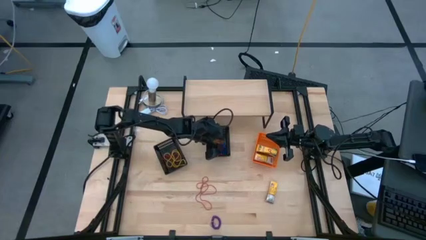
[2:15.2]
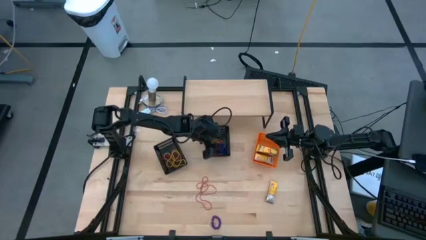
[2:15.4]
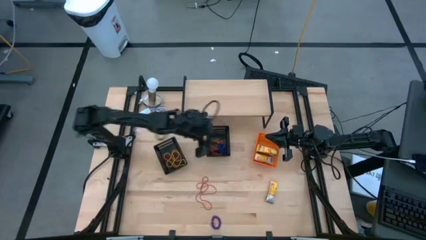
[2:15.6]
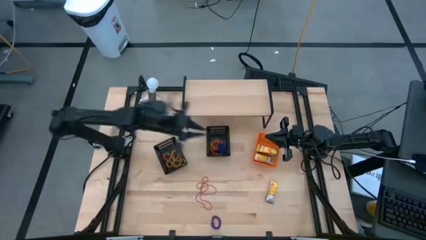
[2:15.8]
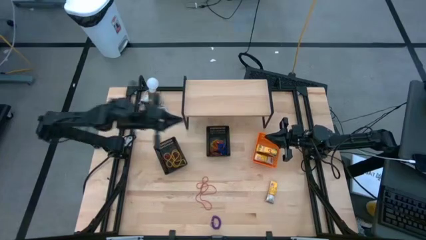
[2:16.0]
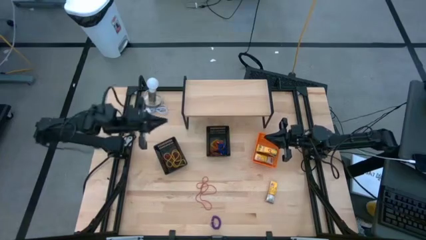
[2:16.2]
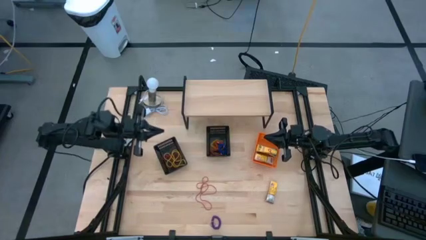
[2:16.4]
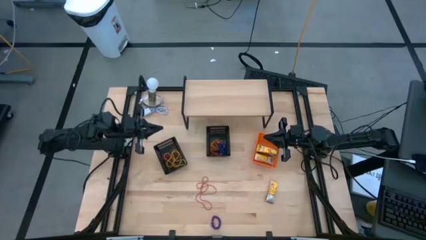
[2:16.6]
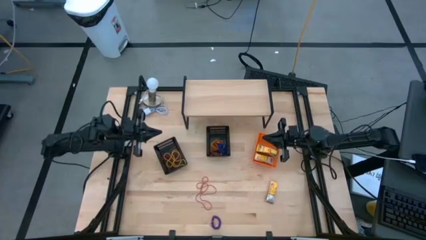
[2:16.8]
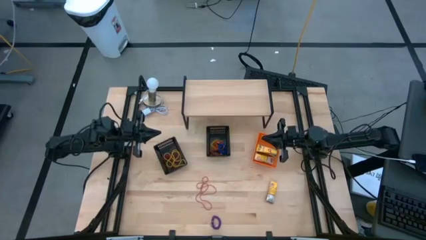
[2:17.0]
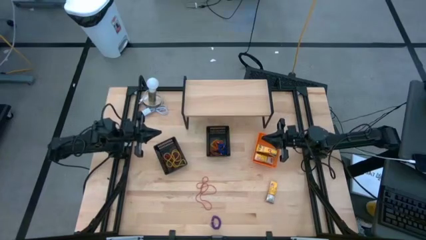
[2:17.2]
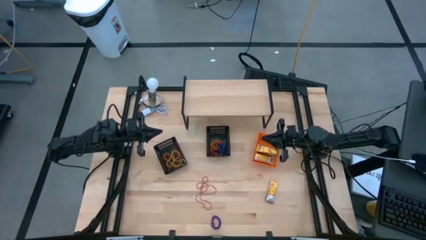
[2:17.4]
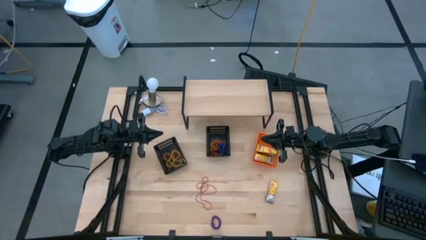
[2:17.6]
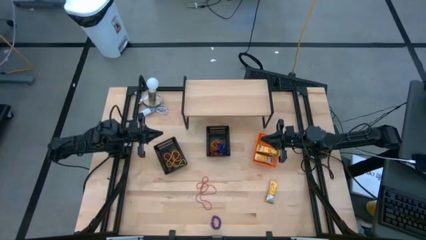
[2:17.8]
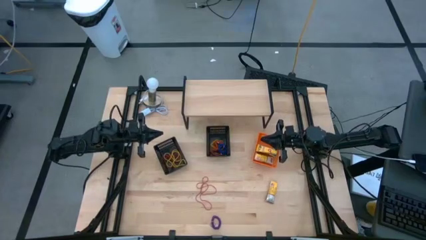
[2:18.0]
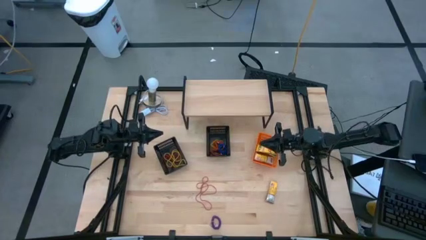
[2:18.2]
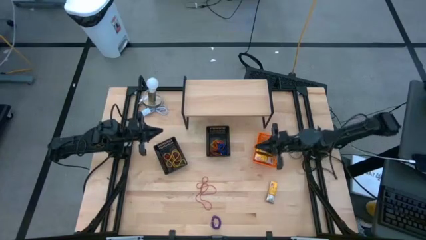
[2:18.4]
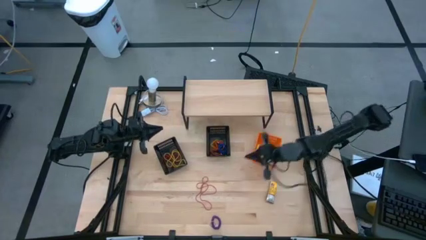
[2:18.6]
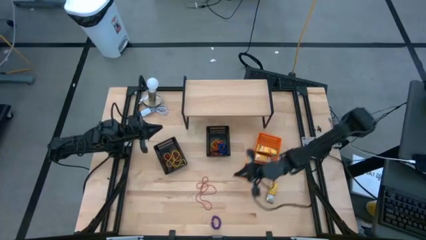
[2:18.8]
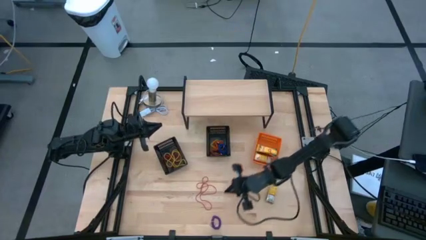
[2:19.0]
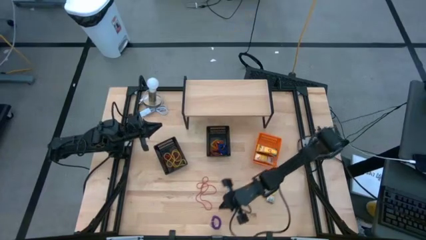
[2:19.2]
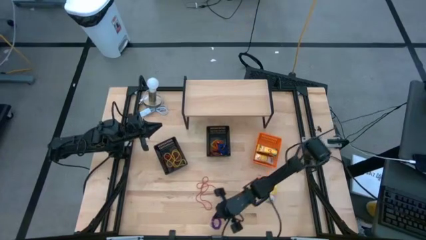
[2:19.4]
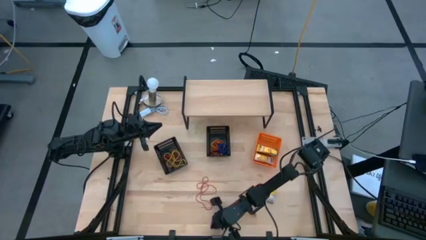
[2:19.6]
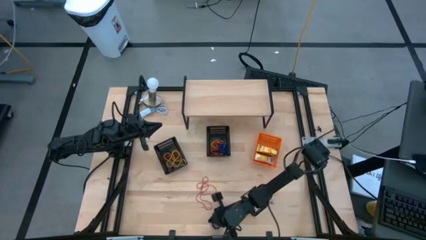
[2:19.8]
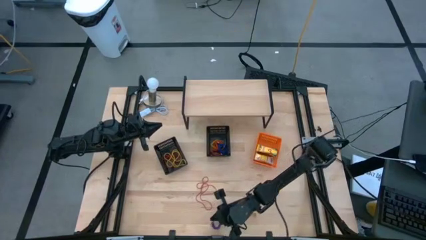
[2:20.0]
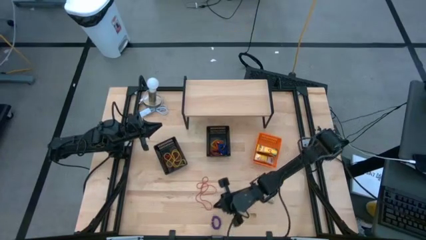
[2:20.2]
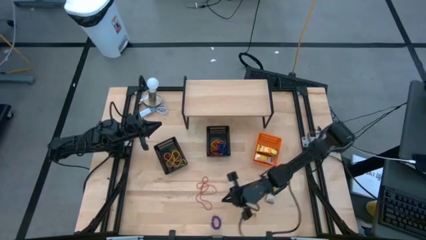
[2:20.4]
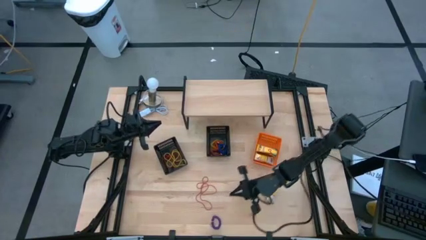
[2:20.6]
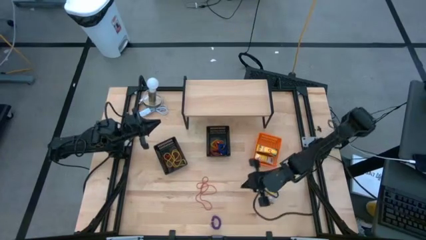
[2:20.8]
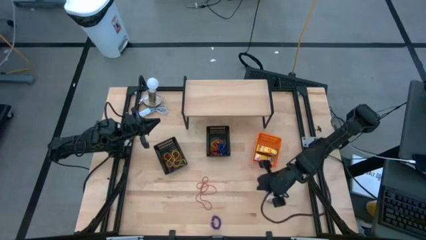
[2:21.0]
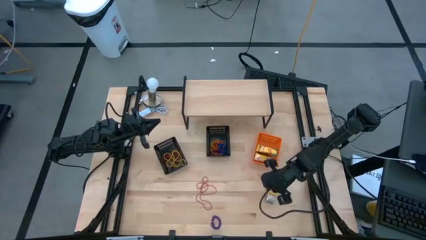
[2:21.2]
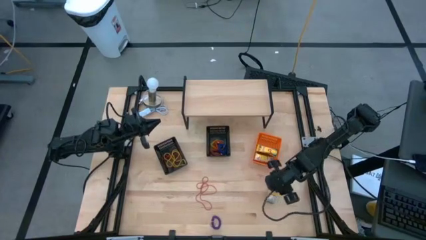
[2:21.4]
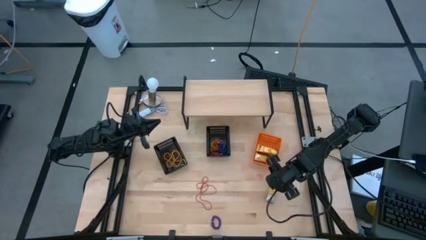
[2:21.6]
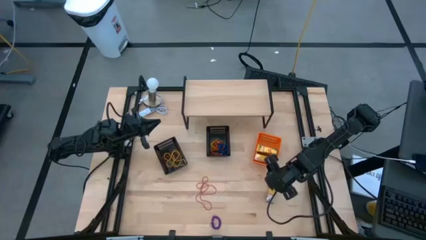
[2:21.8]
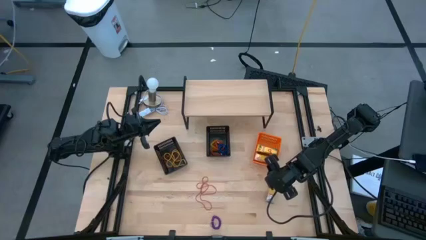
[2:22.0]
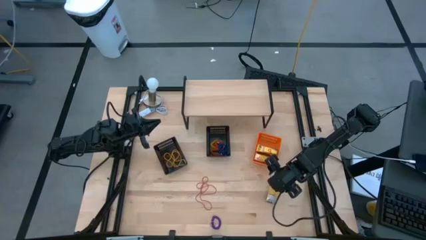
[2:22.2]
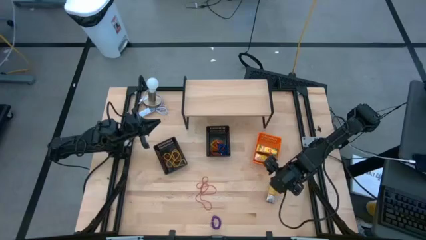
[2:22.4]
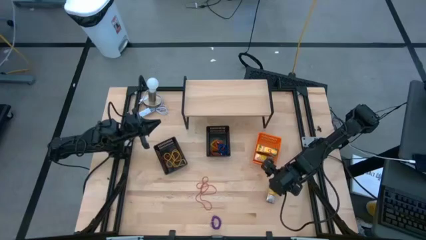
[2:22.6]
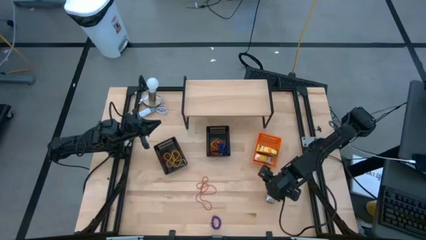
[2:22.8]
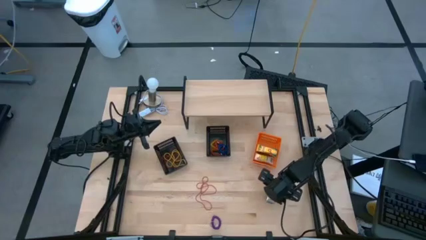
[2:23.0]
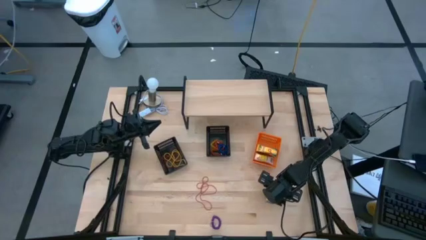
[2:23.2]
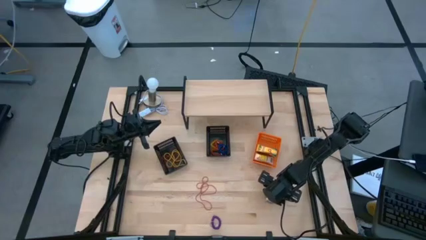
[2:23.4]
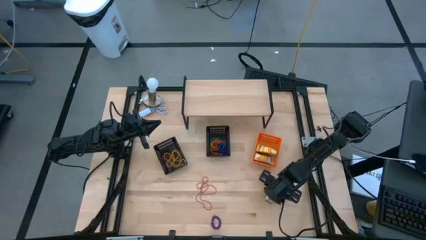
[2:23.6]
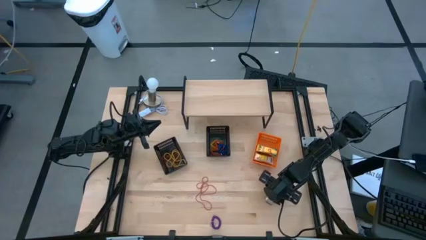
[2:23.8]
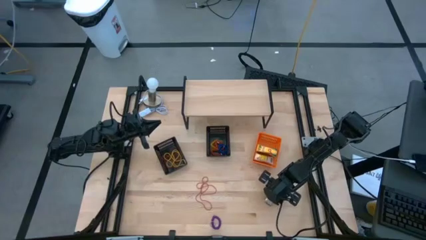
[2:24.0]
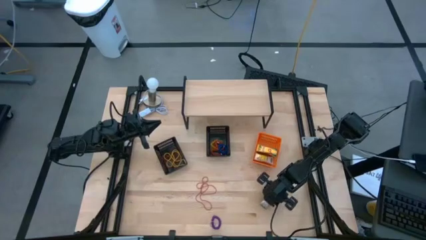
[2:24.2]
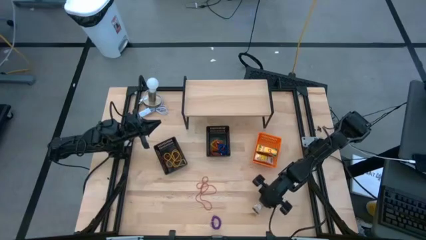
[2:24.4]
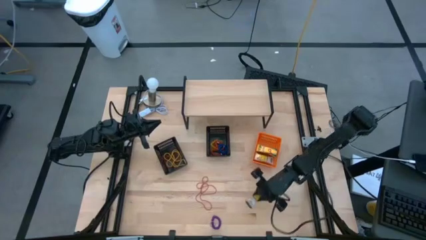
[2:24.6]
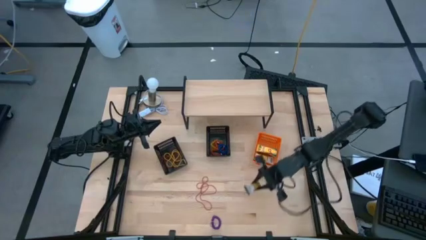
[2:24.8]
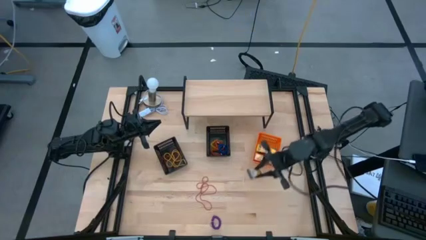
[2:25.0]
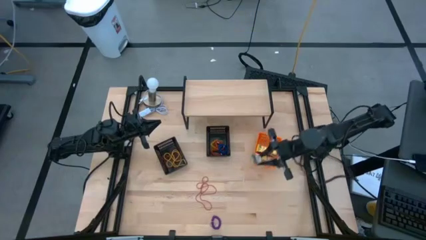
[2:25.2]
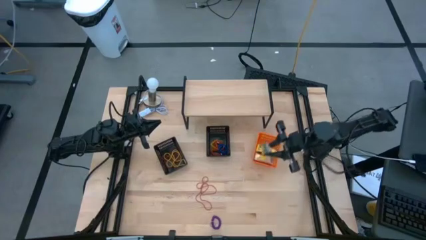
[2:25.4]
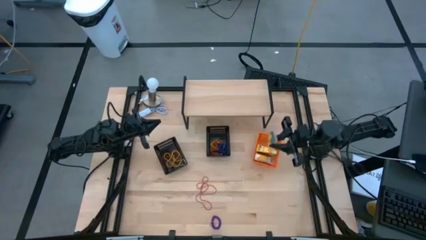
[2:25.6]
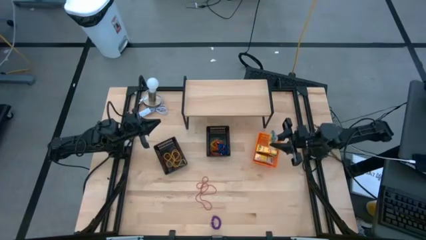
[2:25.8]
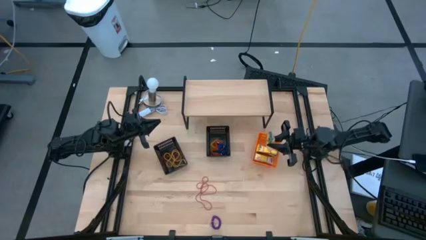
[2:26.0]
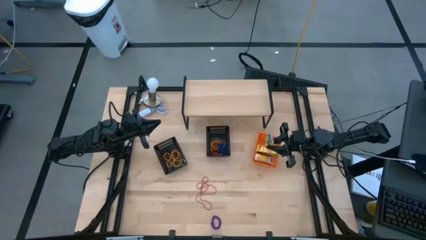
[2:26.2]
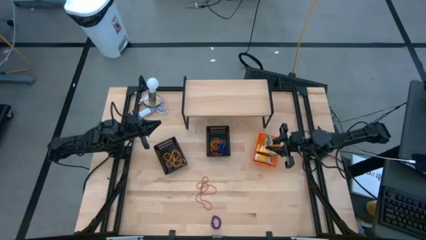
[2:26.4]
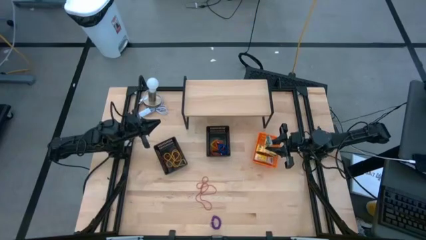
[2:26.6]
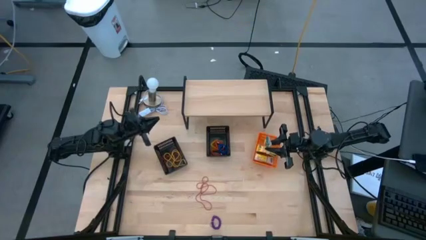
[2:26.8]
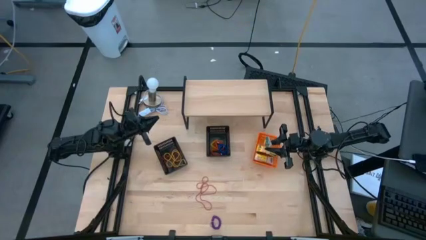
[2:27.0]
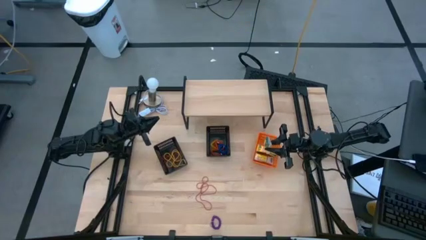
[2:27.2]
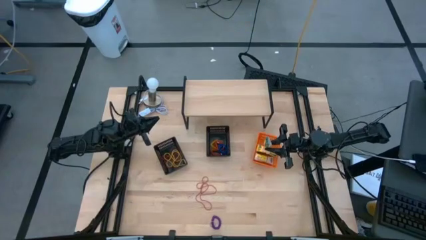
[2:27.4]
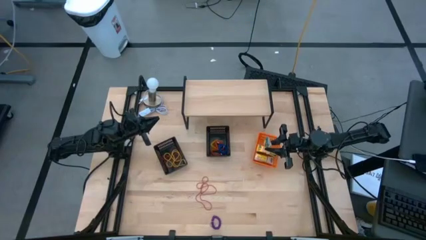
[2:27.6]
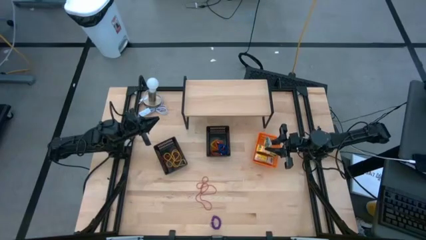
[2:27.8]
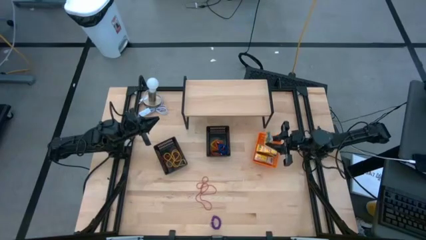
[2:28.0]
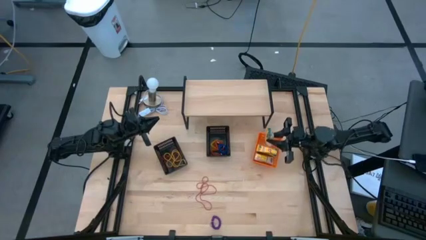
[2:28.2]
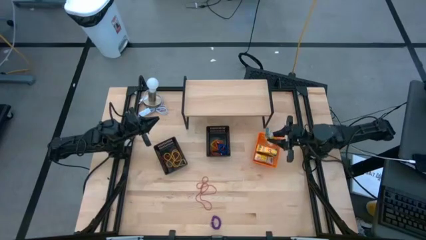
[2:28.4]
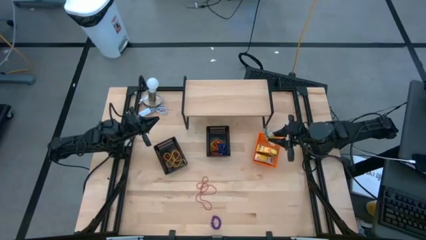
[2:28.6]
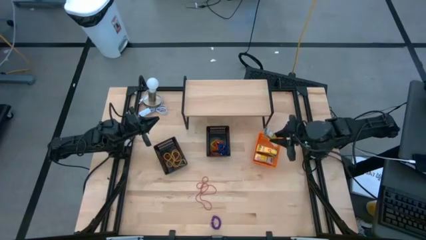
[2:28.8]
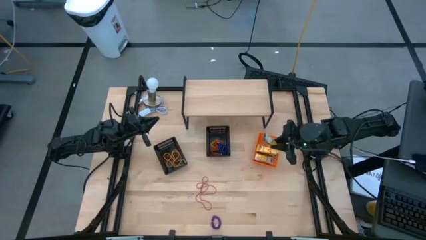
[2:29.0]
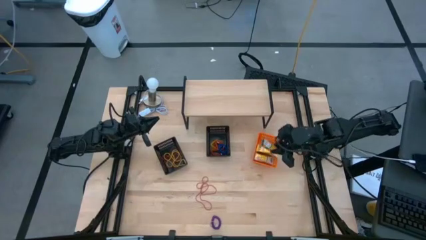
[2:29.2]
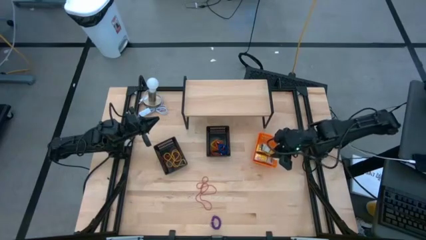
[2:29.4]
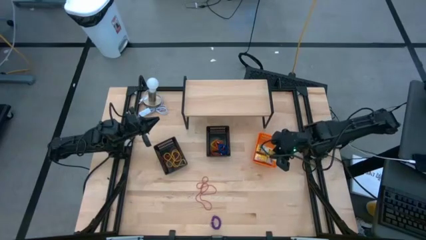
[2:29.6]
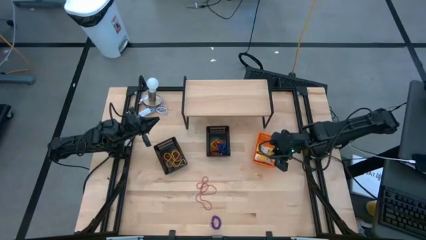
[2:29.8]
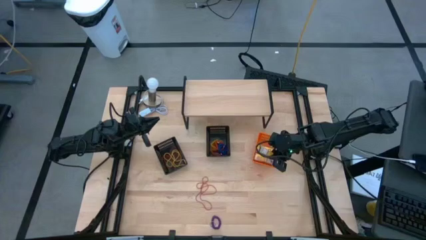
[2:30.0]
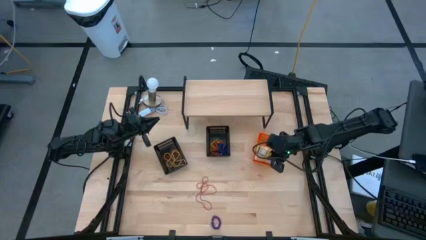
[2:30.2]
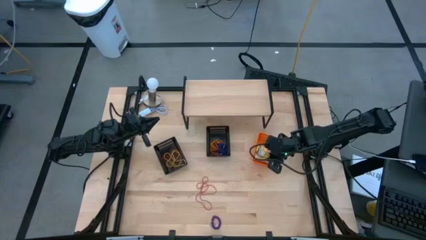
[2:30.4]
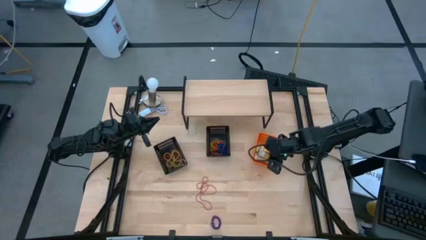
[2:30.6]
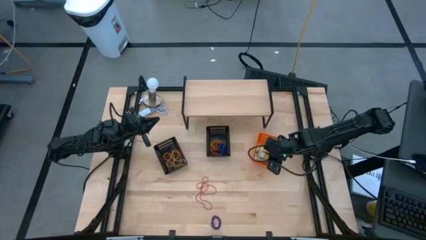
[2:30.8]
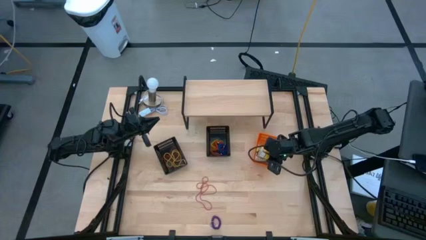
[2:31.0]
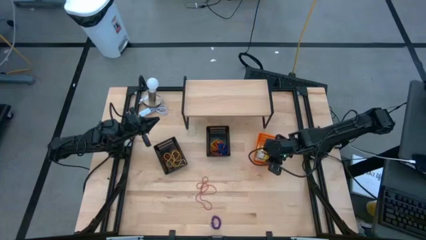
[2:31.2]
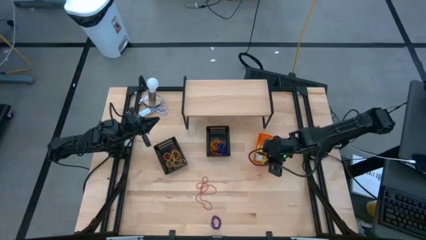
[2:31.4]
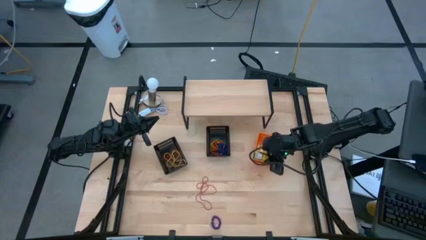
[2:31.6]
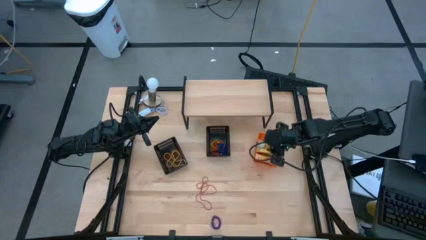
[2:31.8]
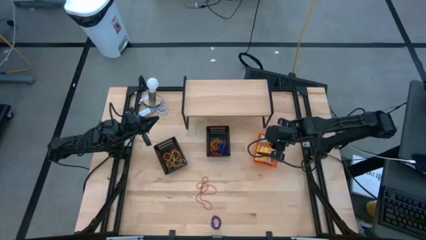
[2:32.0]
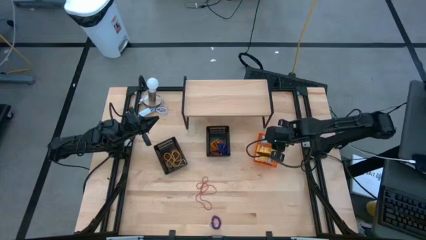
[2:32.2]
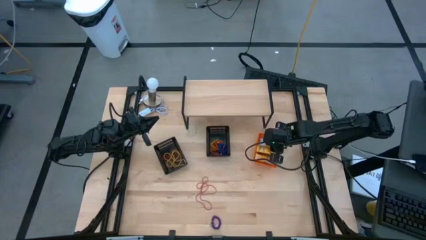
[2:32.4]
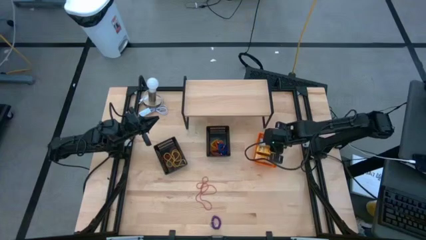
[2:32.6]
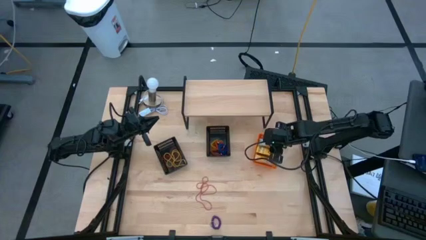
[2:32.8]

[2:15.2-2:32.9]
Task: Pick & Place Office Desk Supplies
Put the crayon box into the orange basket
